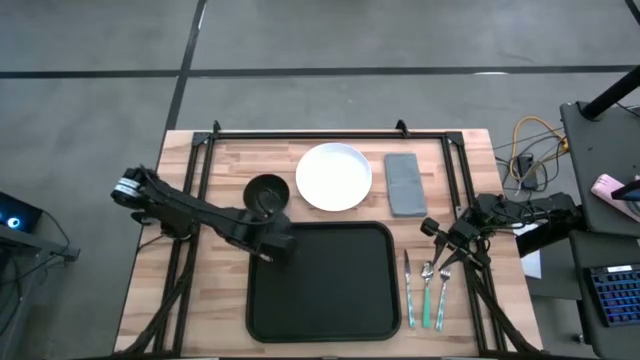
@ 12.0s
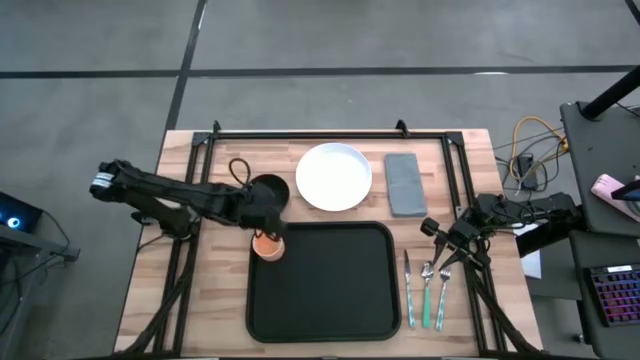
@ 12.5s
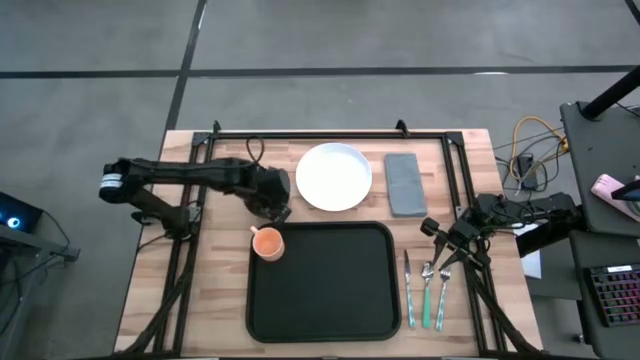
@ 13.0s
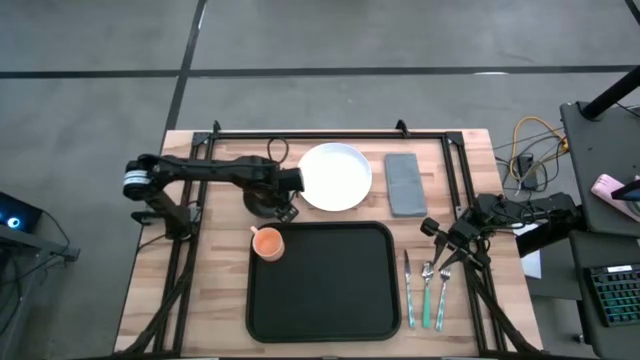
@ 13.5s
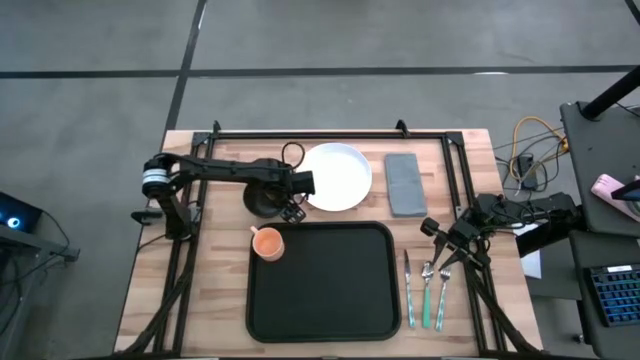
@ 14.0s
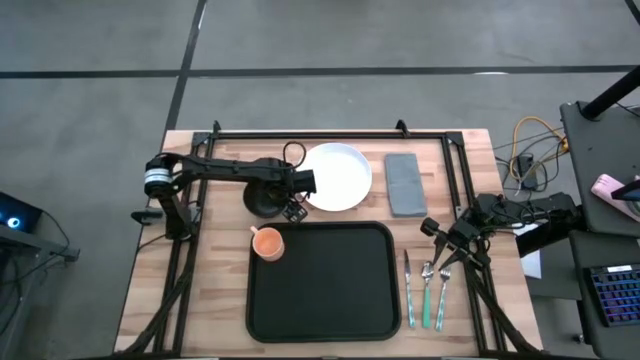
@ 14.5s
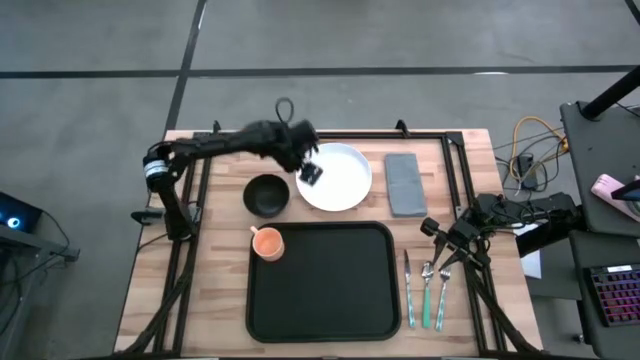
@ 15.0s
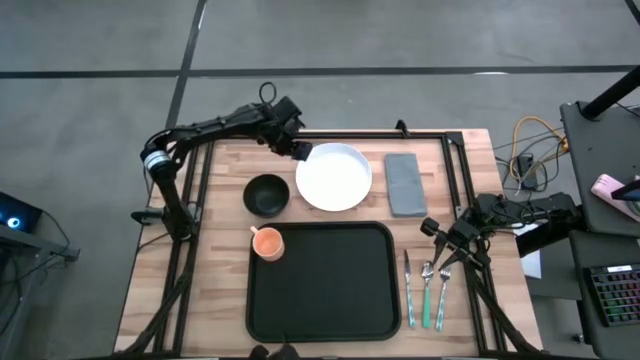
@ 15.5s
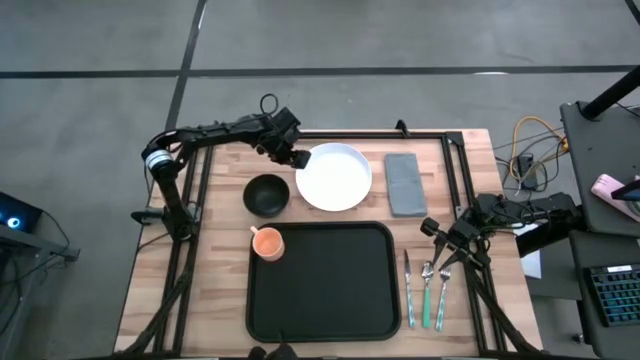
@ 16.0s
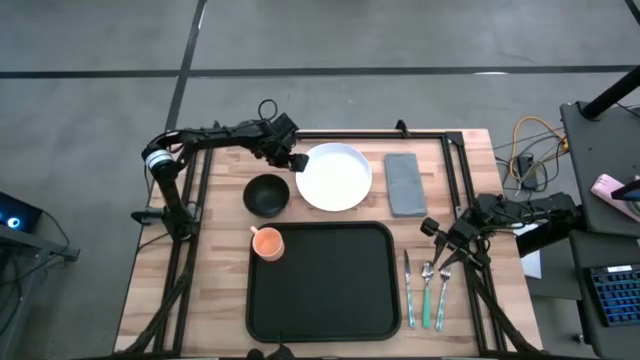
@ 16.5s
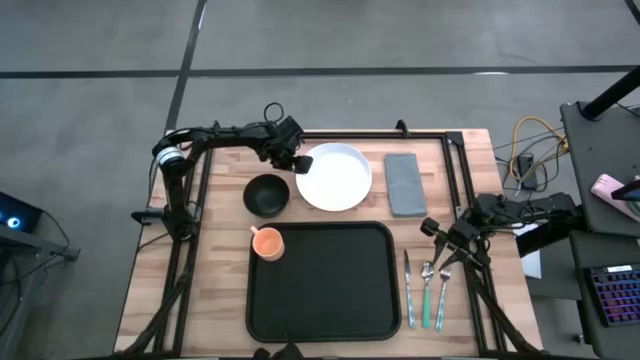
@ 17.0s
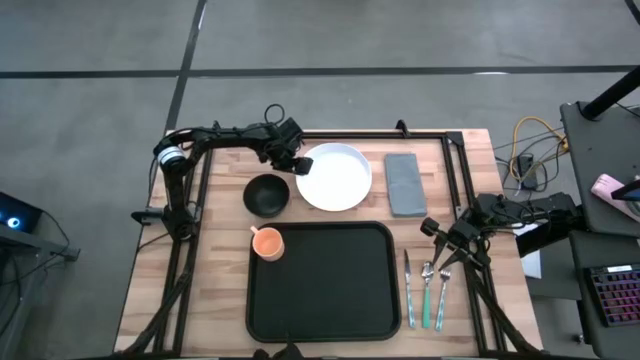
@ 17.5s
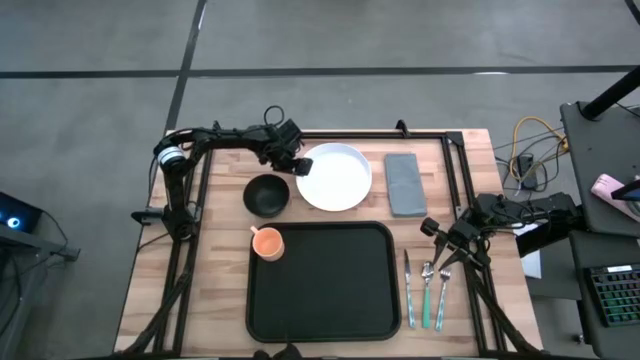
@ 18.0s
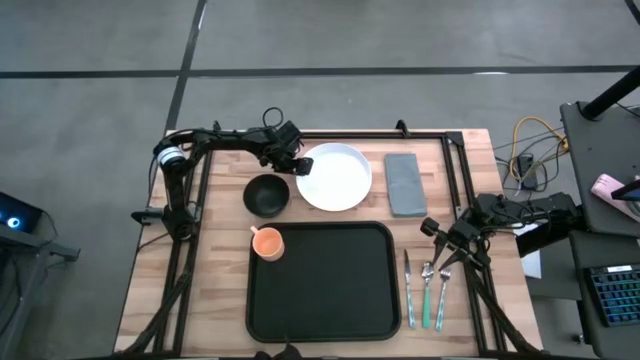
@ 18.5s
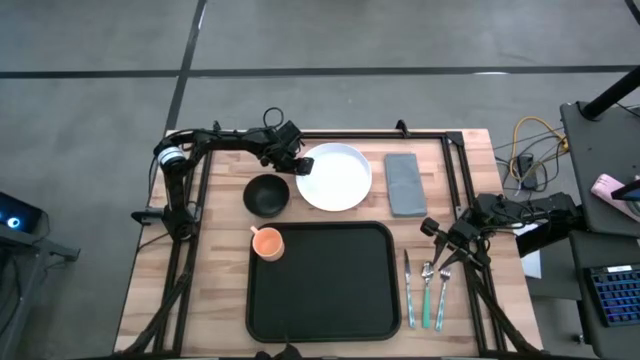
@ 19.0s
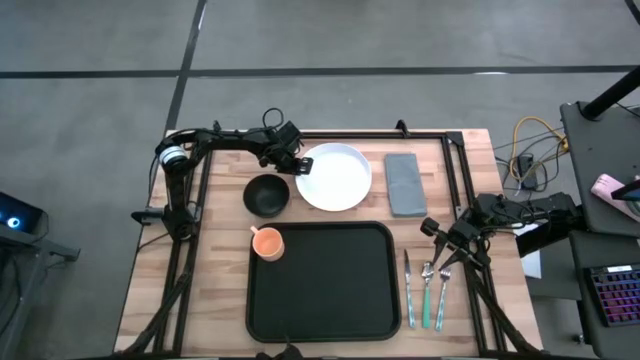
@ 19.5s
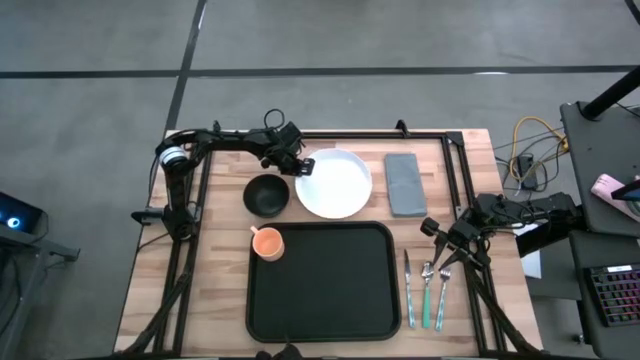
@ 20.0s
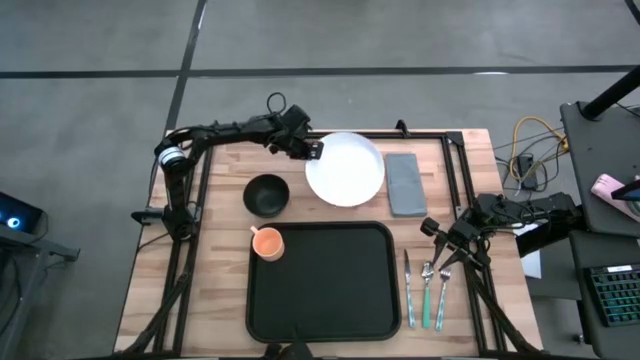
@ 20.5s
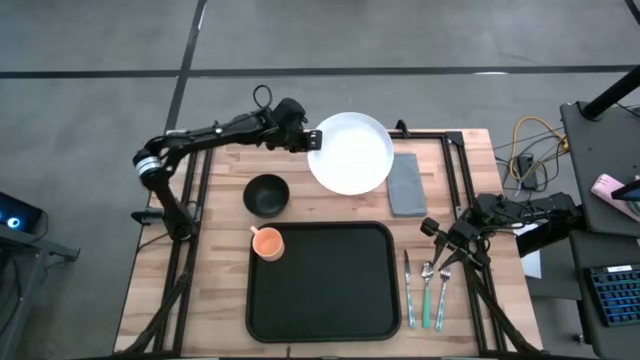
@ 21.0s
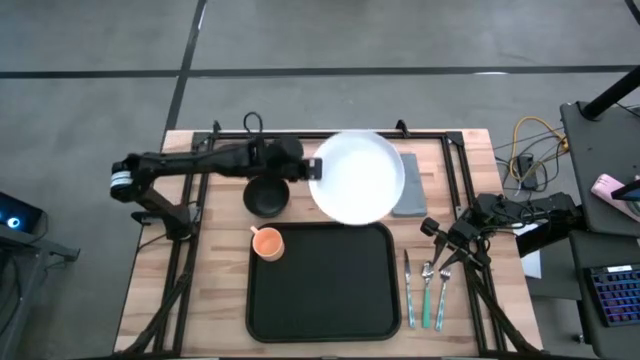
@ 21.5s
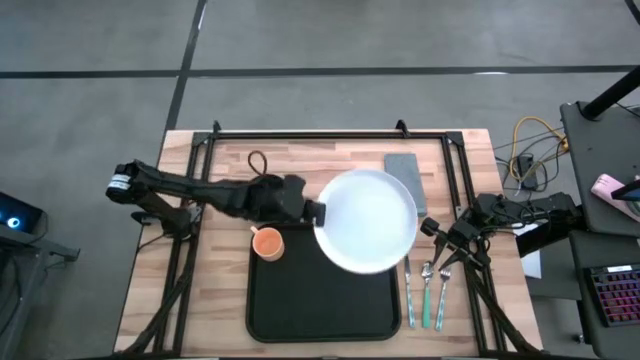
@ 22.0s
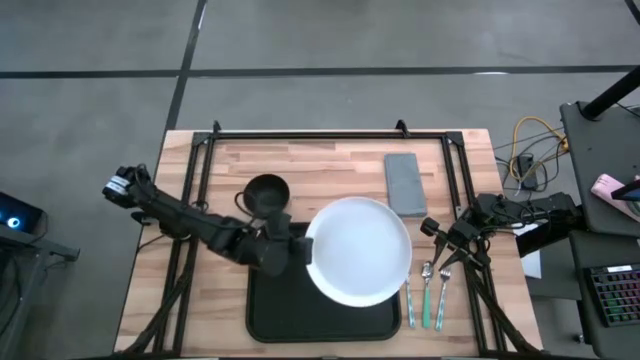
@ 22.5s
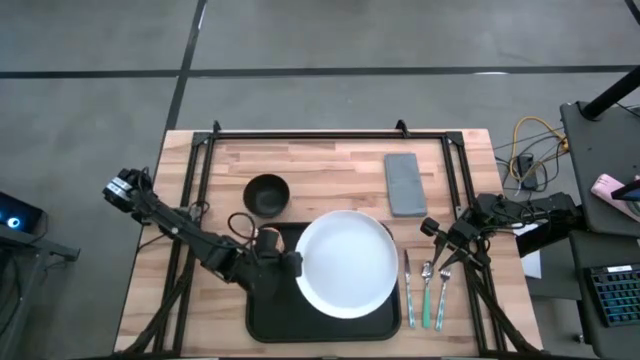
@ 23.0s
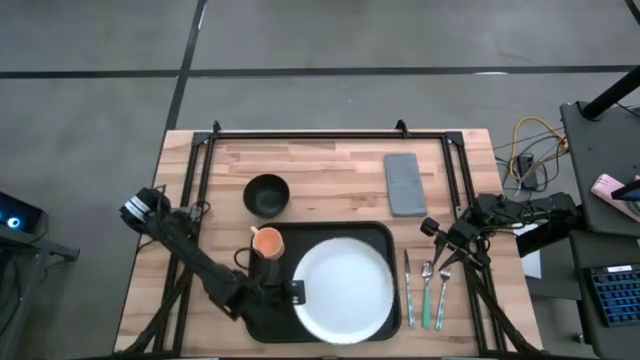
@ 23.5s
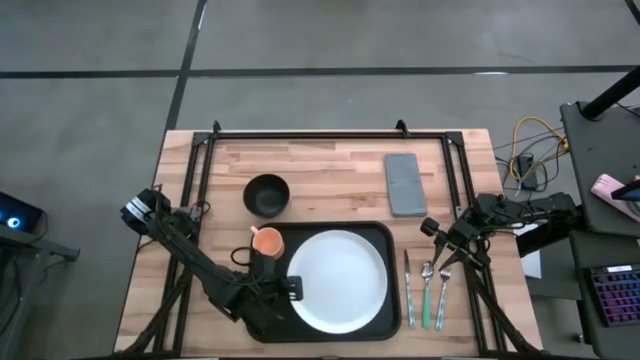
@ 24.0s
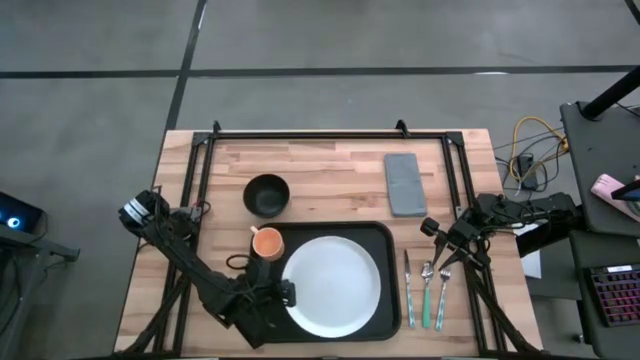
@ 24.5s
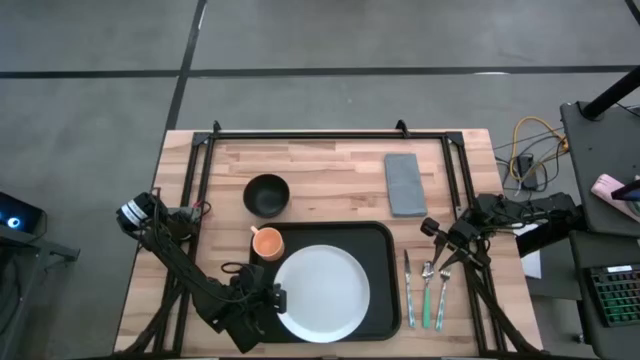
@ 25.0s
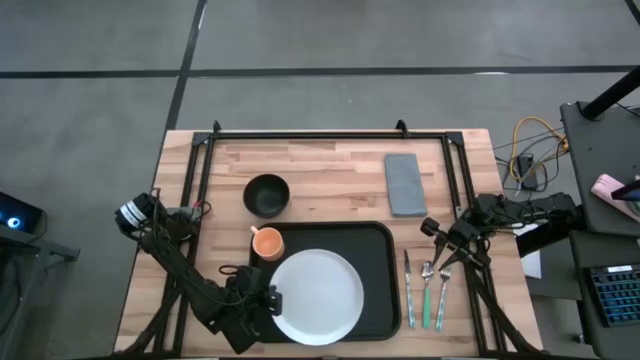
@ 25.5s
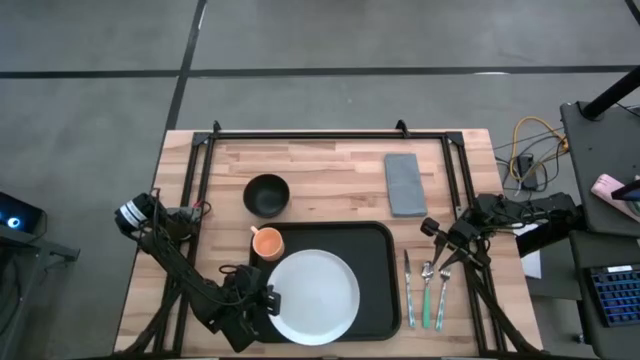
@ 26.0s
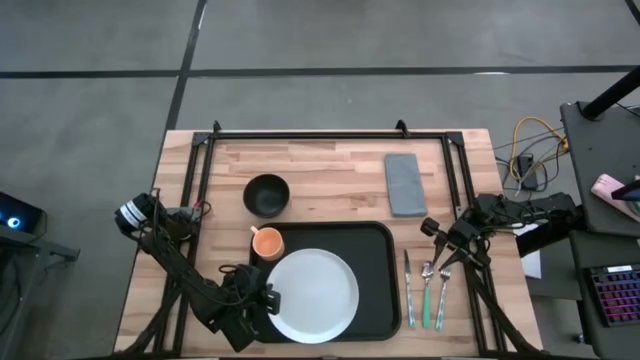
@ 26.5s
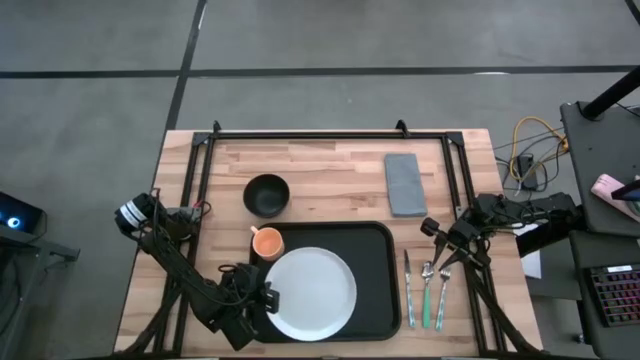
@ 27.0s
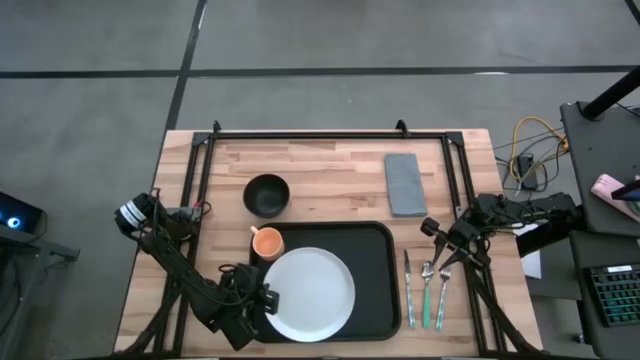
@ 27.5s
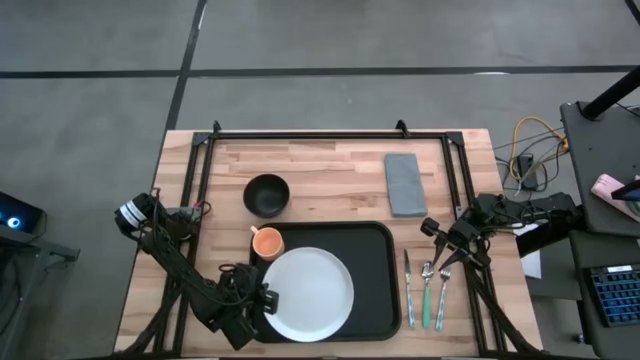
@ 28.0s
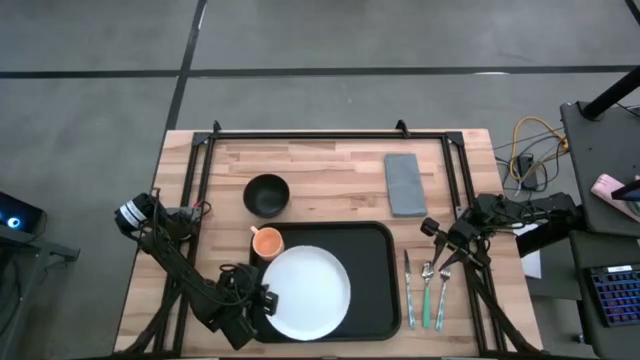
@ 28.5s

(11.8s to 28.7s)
Task: Set up tray
Put the white plate to the bottom right of the orange mug on the black tray

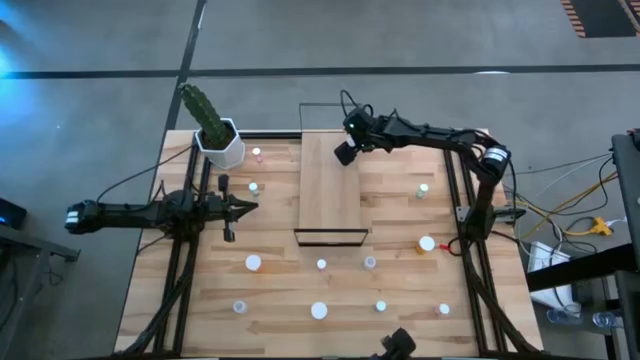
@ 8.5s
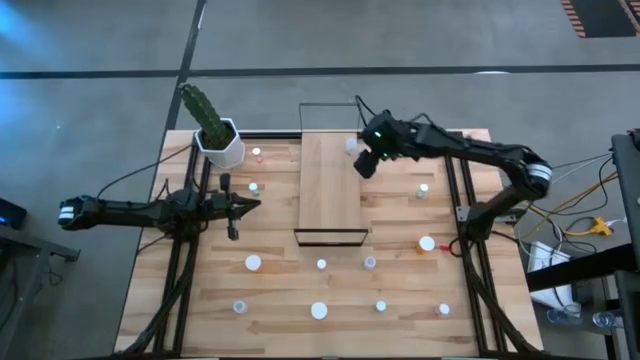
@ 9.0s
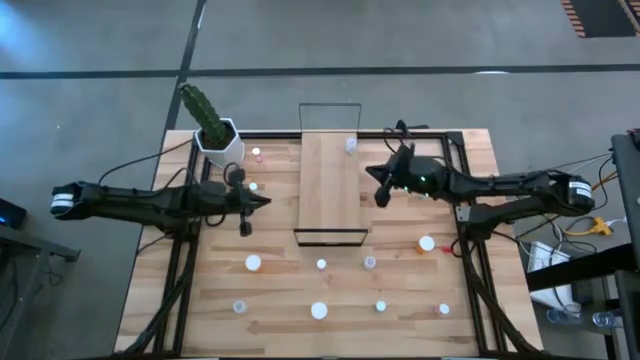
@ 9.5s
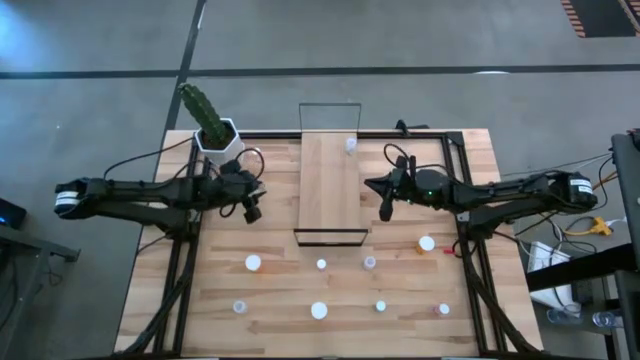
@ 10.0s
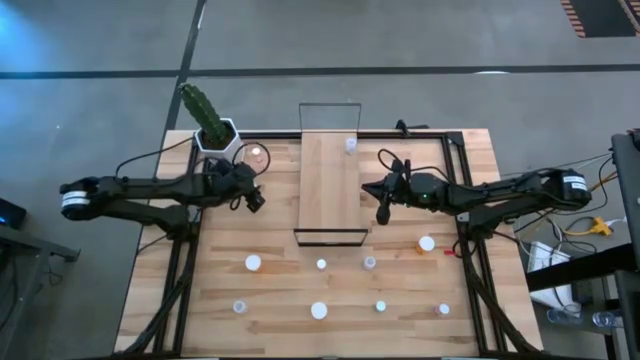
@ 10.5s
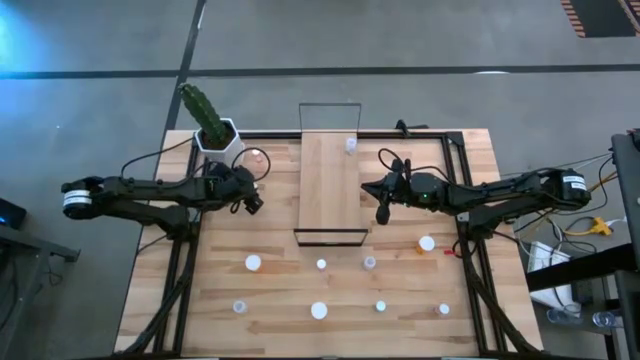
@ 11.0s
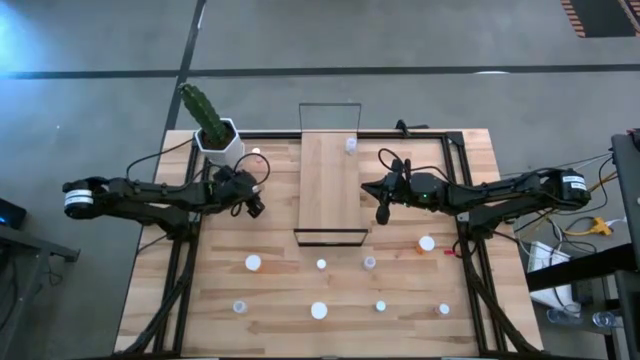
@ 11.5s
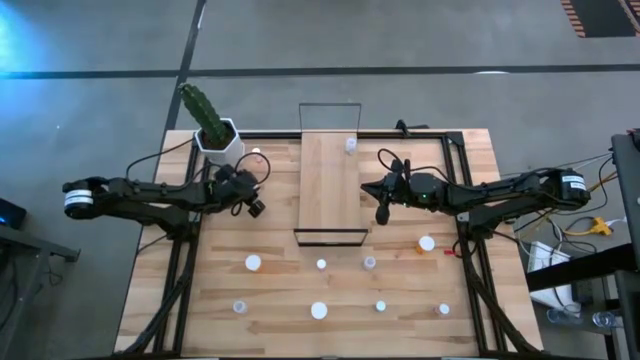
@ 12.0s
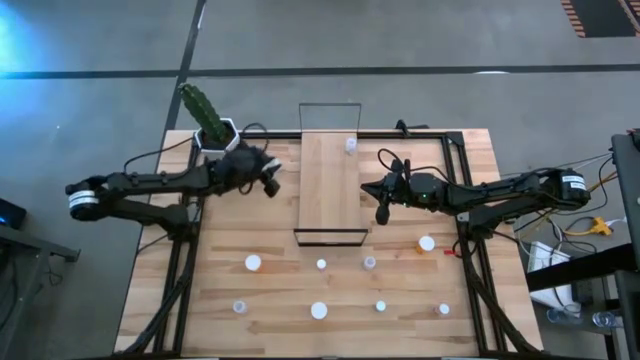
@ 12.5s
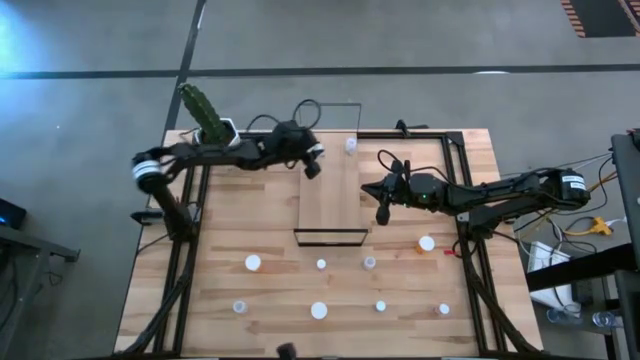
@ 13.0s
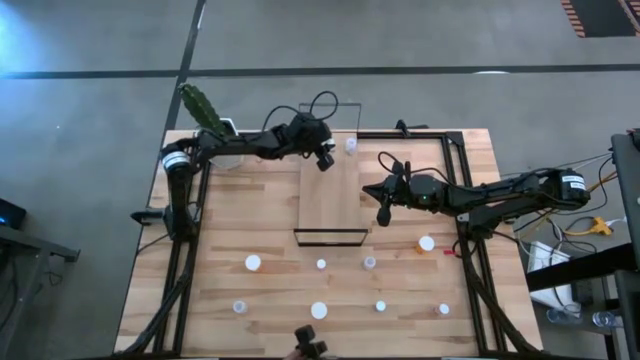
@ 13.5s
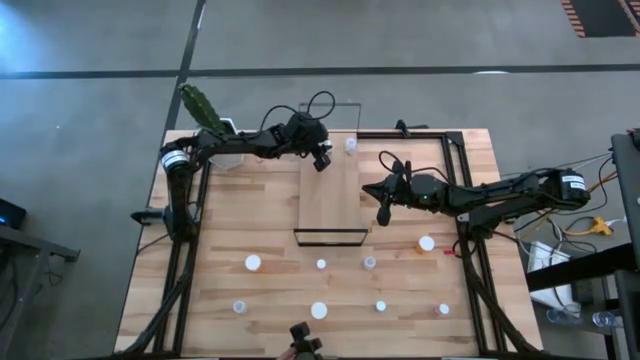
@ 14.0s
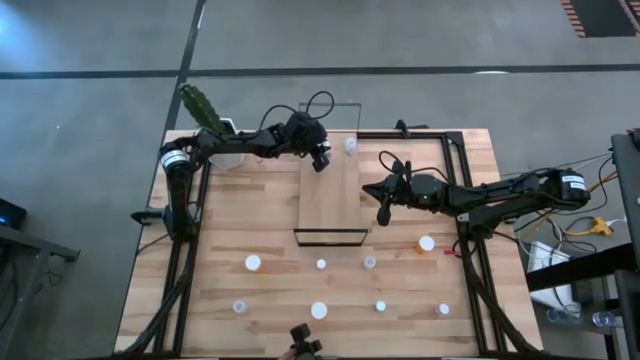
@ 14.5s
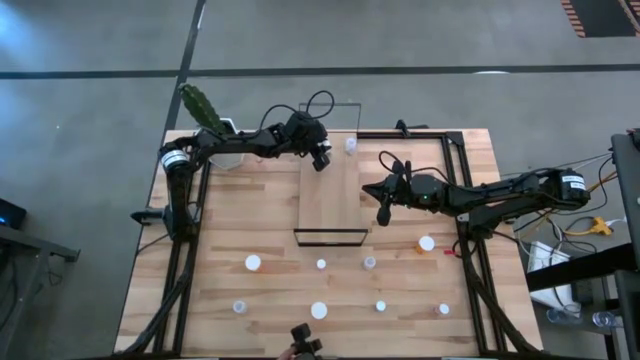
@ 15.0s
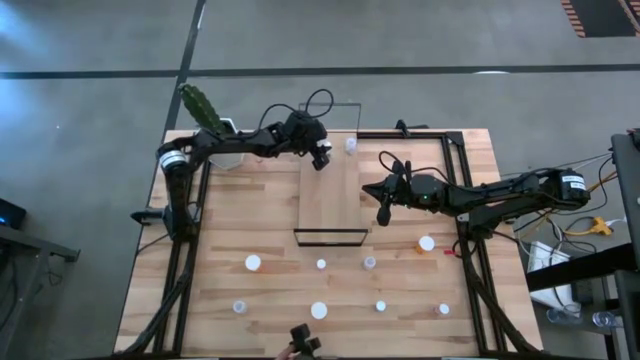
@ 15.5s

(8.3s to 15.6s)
Task: Pick and place medicine bottles onto shelf by color
Put the top left transparent light blue pill bottle on the shelf
